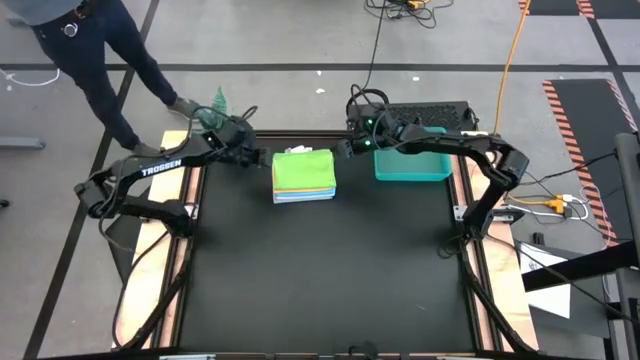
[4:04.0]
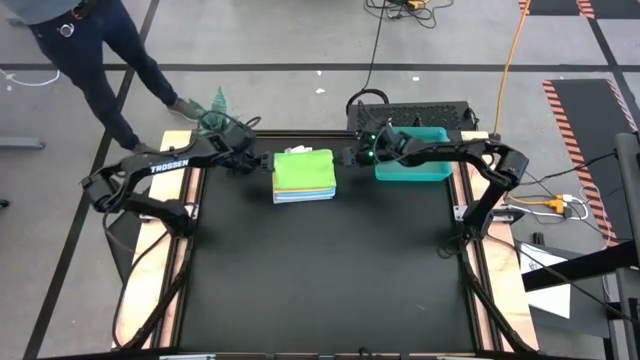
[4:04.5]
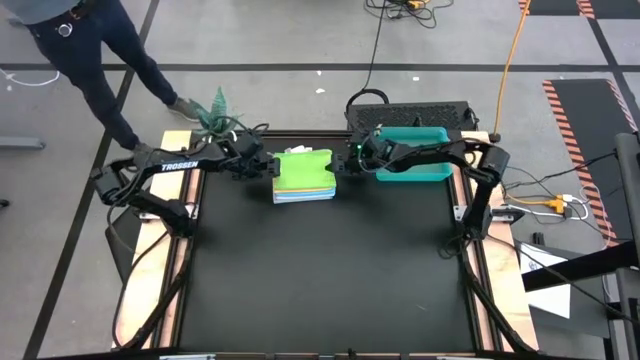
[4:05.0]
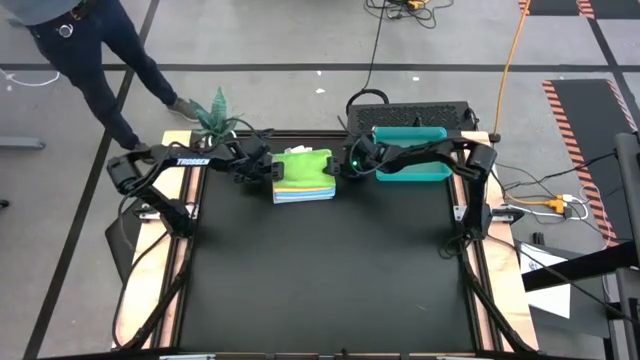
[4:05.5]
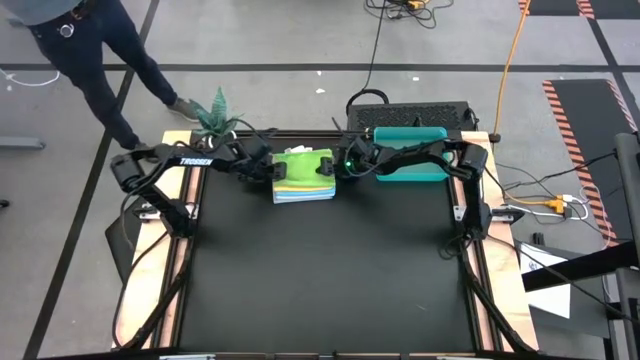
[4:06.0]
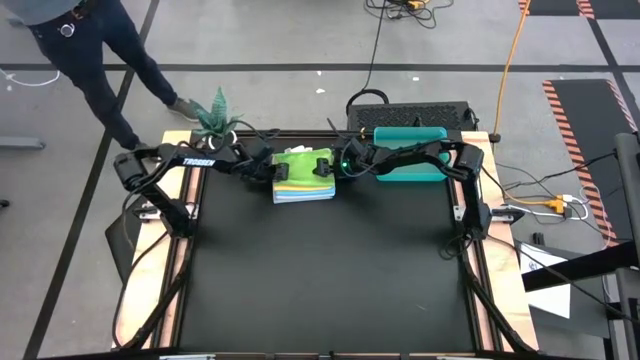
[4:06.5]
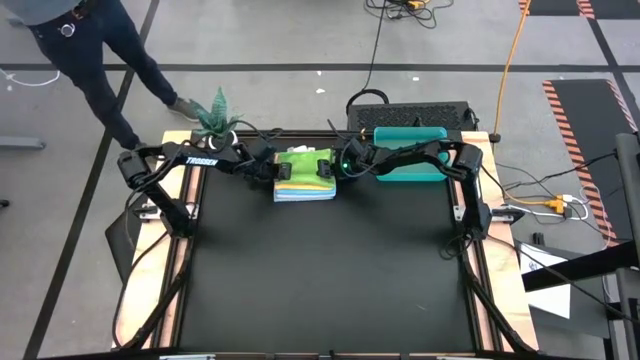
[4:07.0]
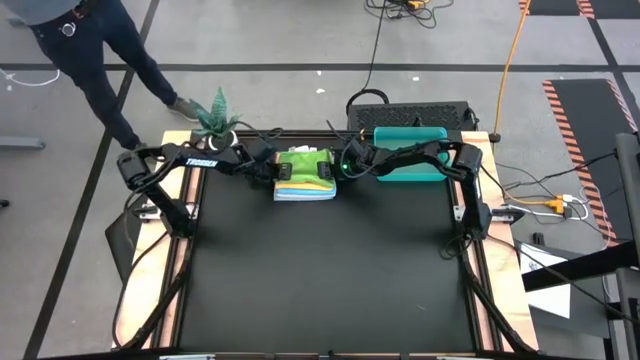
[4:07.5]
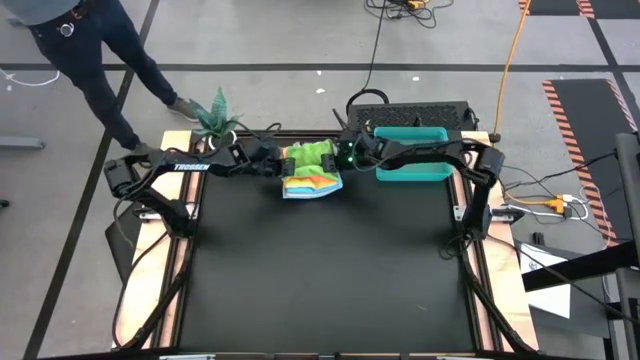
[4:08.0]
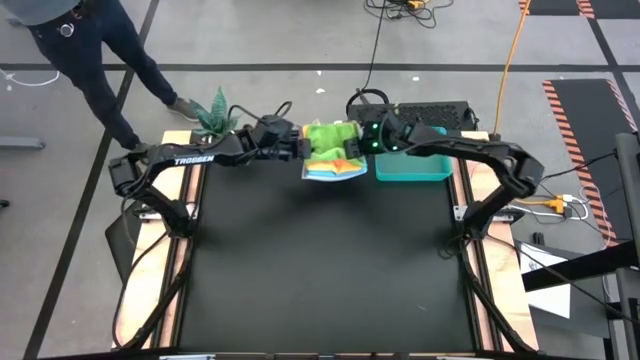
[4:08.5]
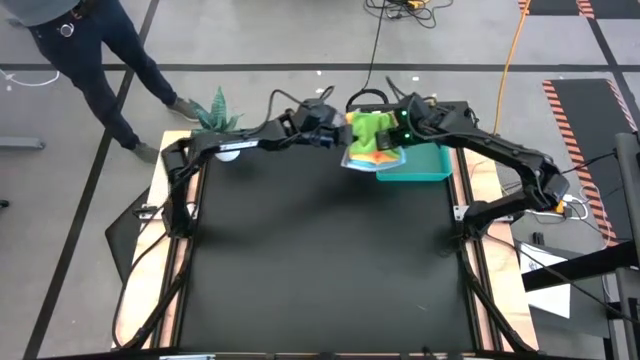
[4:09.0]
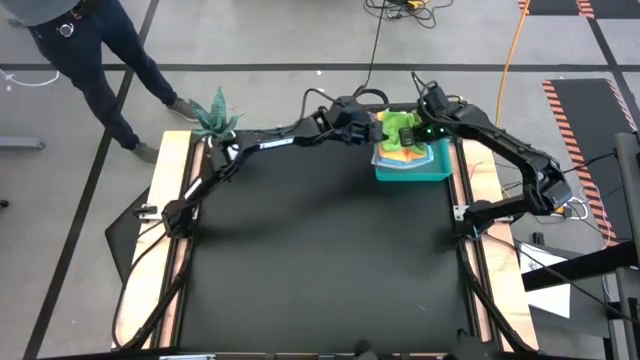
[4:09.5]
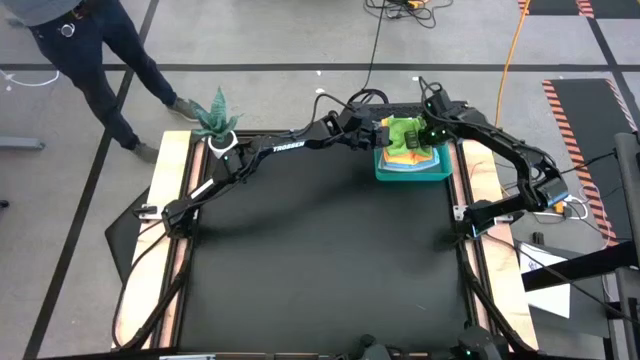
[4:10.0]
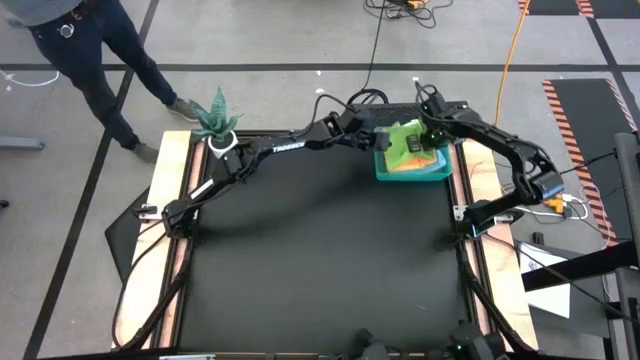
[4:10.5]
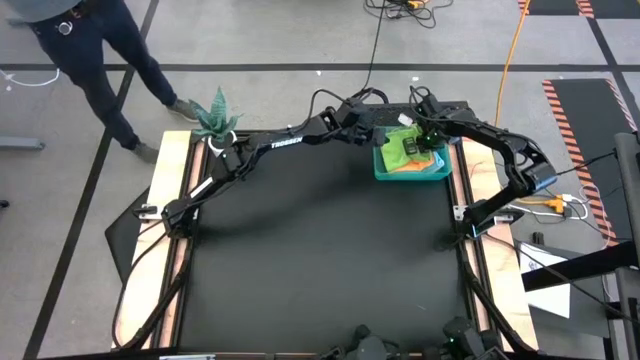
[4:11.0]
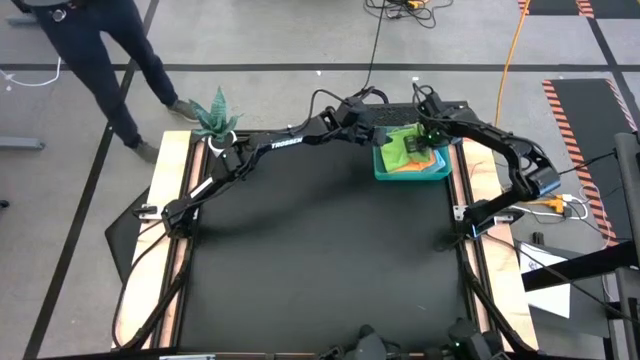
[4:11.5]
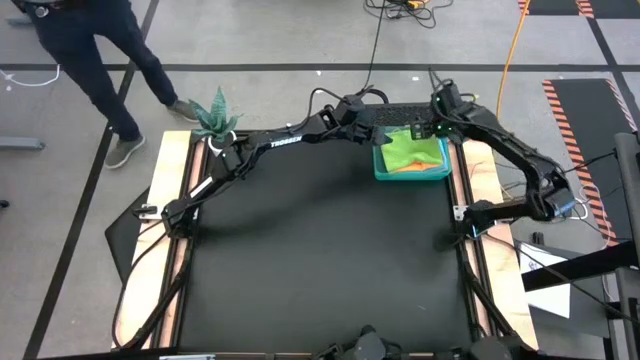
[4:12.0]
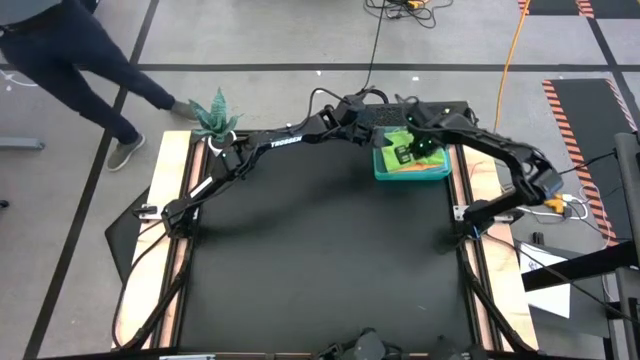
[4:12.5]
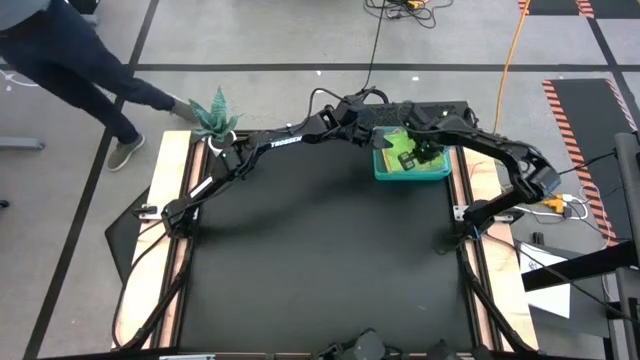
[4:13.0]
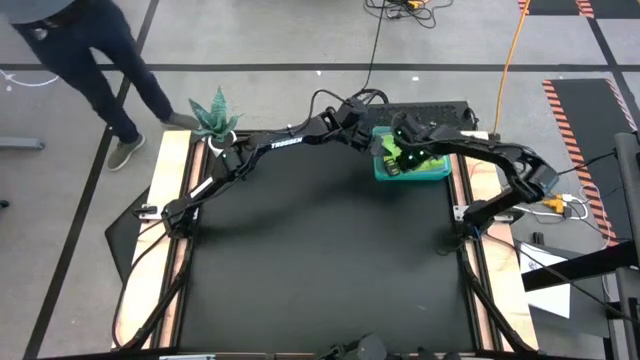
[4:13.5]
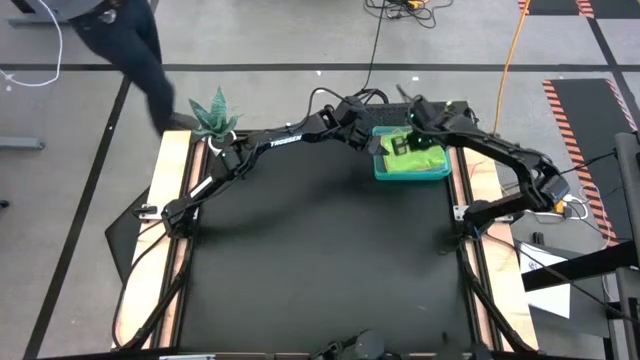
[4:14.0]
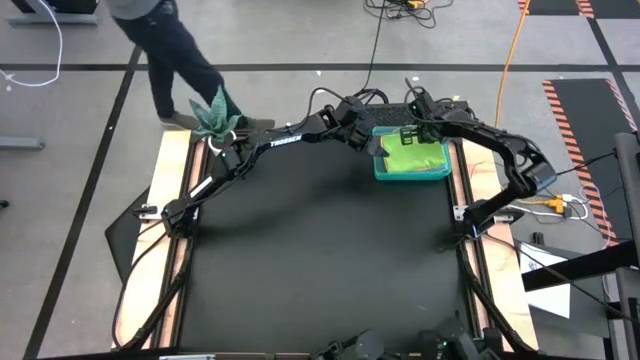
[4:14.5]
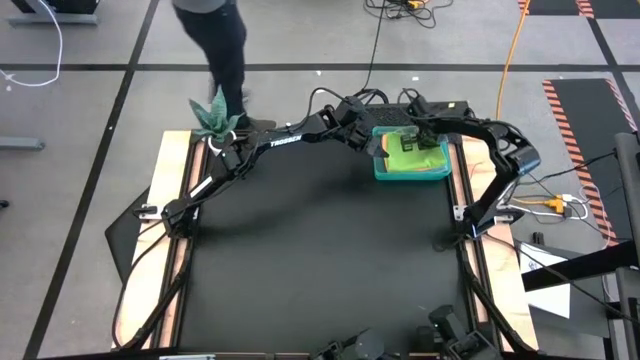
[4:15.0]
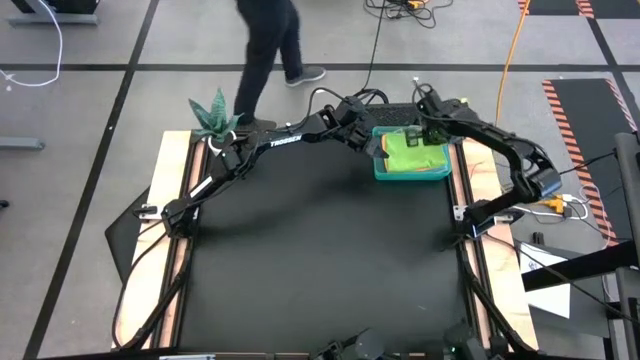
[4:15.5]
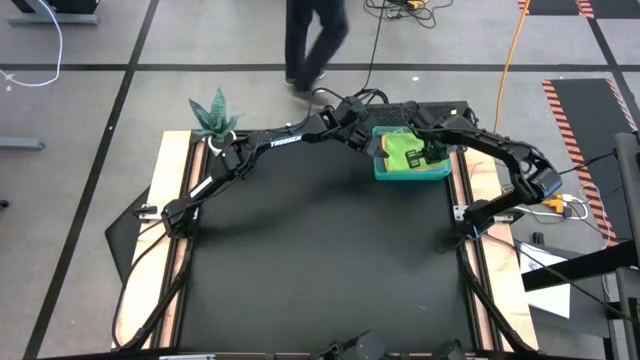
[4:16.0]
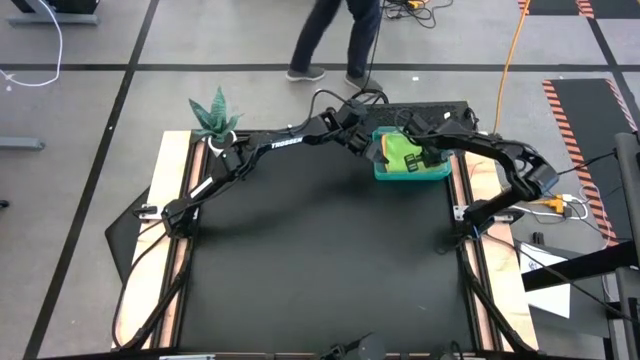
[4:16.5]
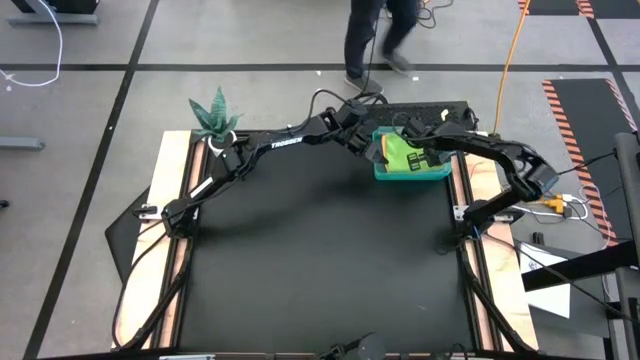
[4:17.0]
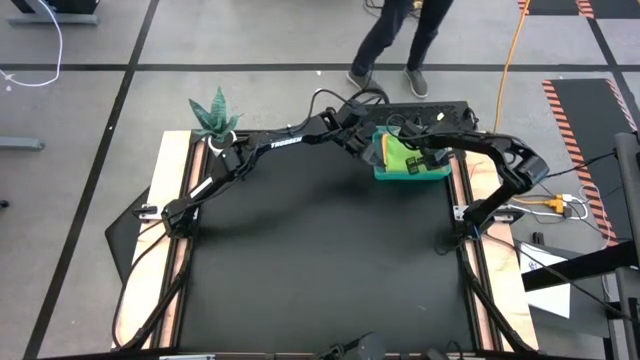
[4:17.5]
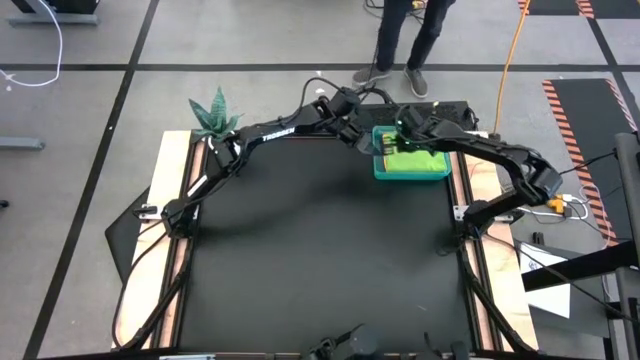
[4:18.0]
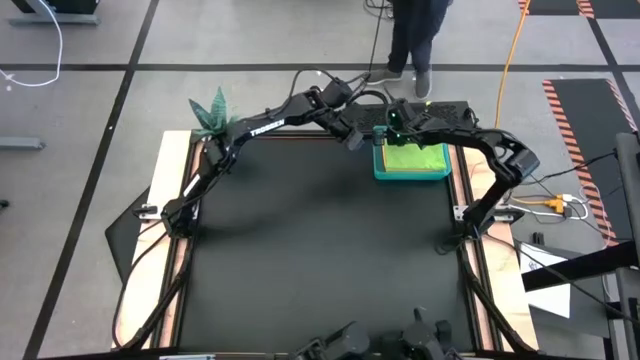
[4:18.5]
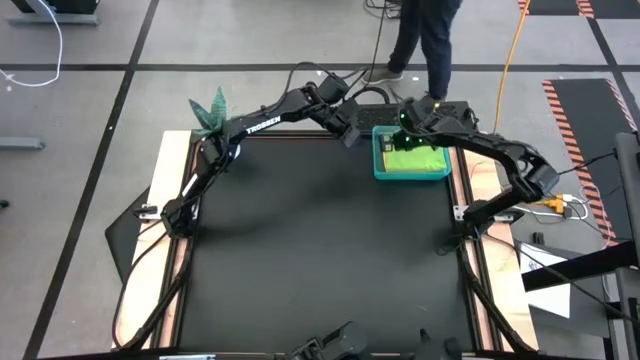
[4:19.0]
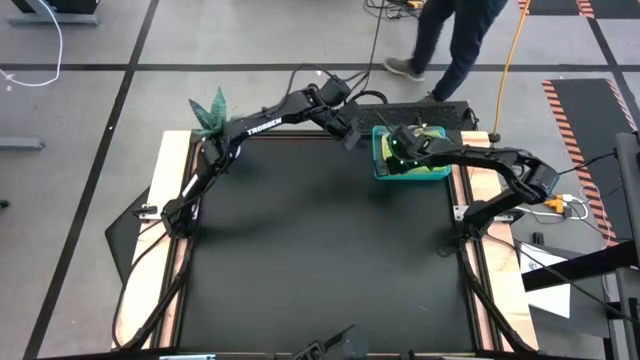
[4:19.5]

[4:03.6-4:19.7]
Task: Fold microfiber towels
Put the stacked microfiber towels into the green bin

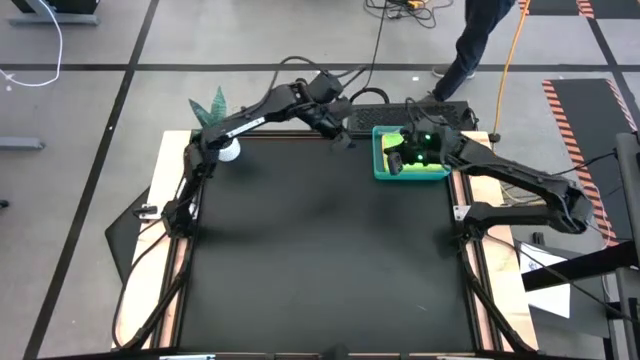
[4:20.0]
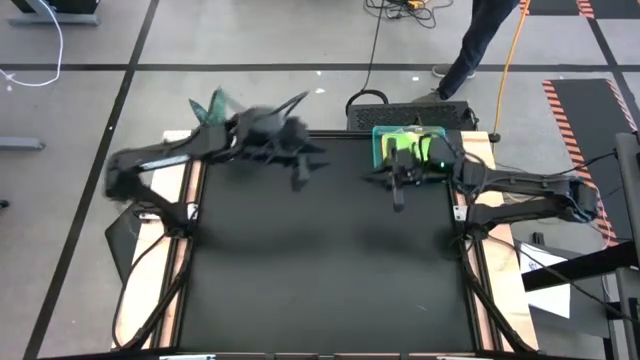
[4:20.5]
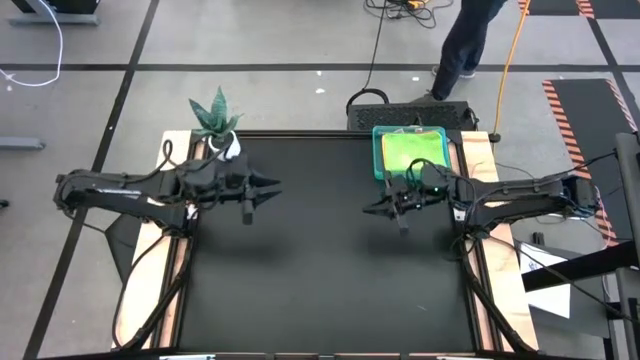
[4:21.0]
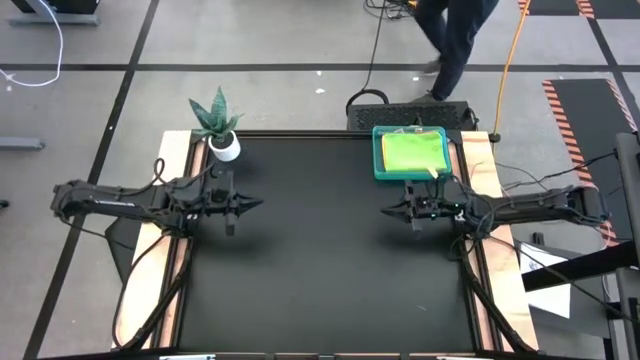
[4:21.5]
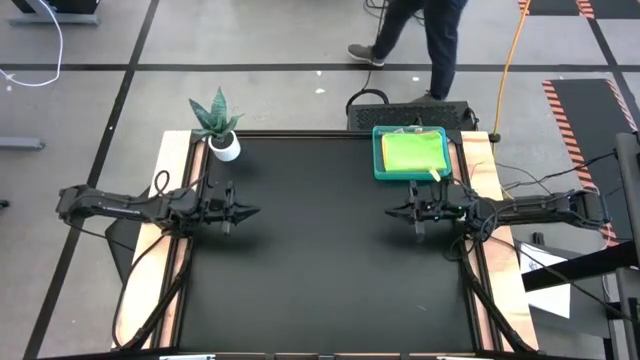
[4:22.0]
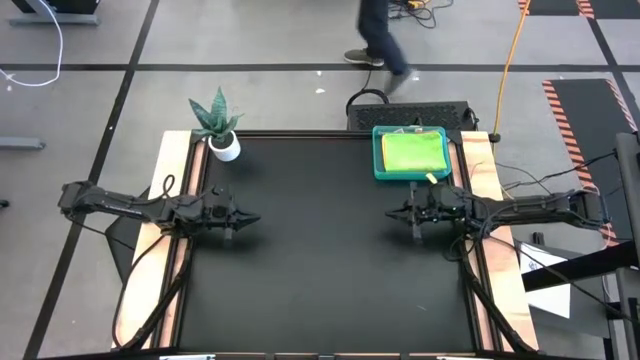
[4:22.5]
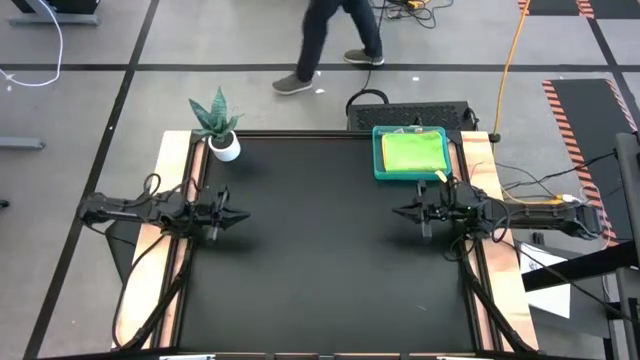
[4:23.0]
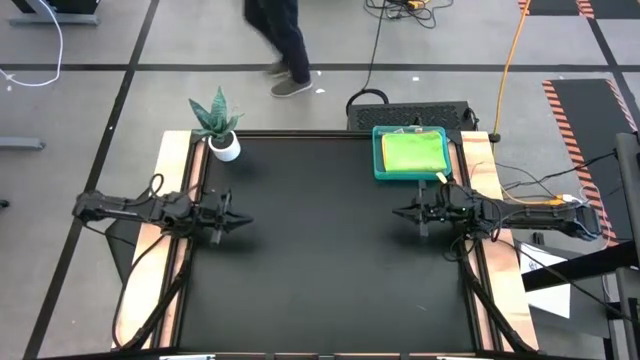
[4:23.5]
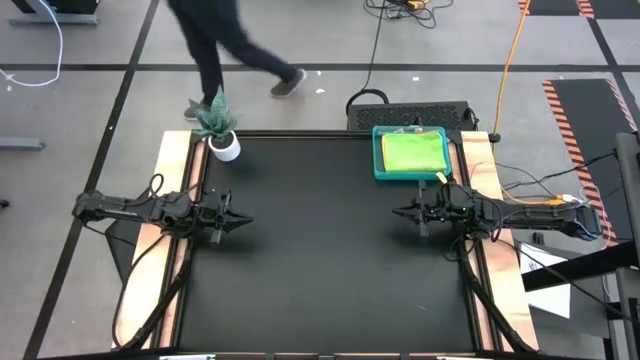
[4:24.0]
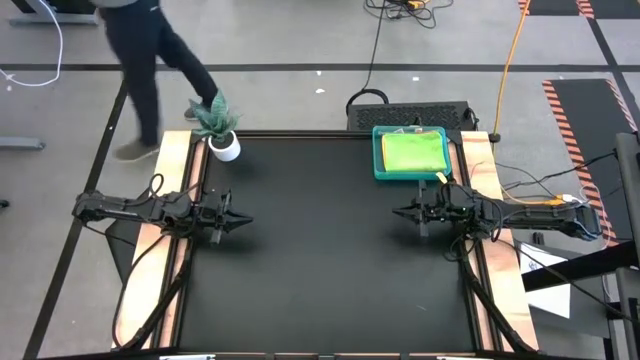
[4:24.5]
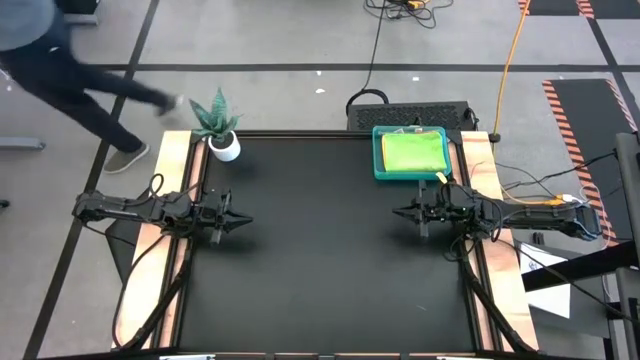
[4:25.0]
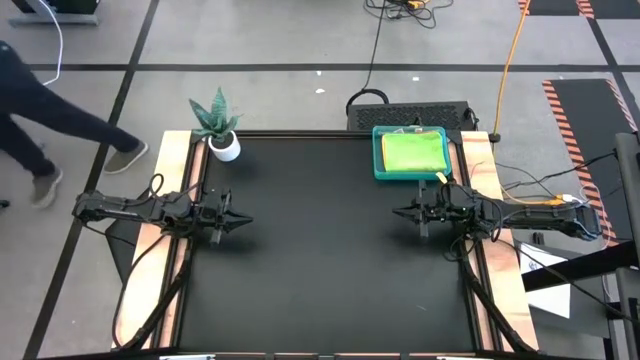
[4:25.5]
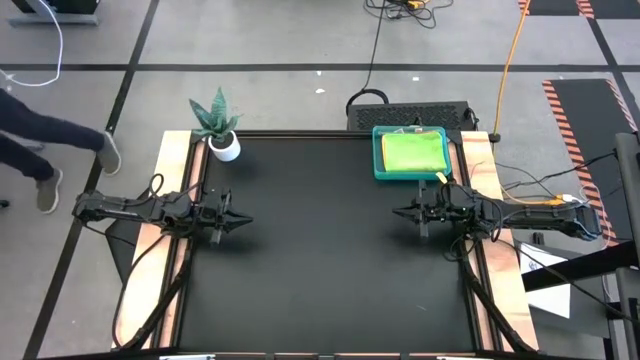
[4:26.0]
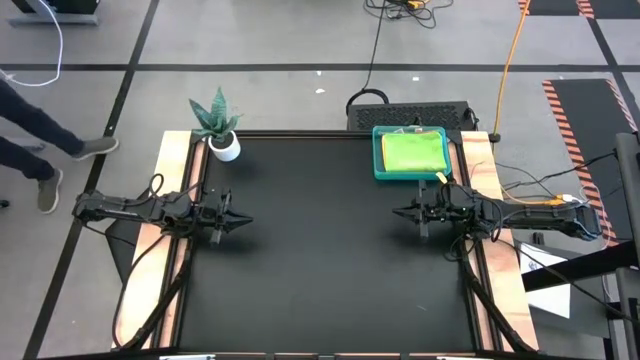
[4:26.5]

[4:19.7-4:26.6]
Return to Home Position
